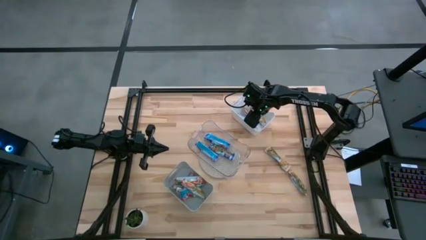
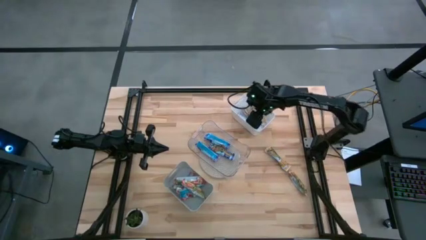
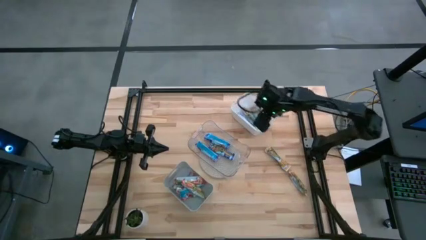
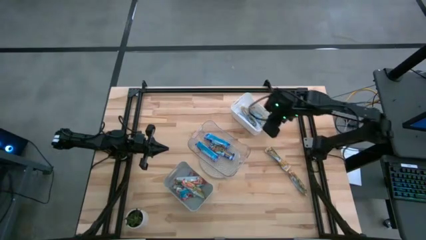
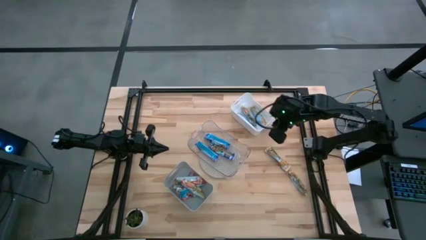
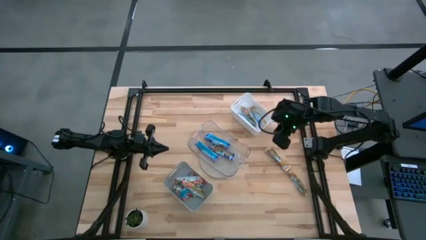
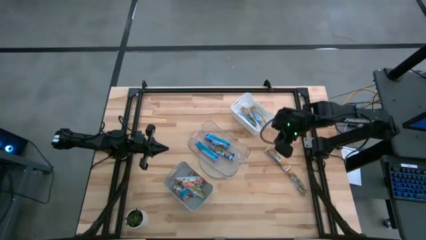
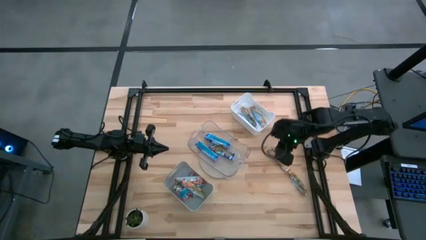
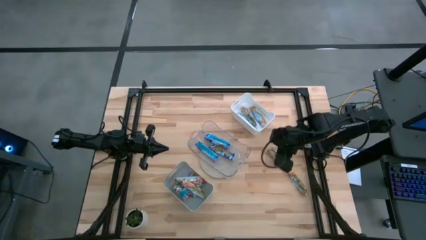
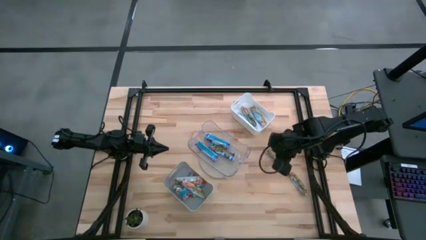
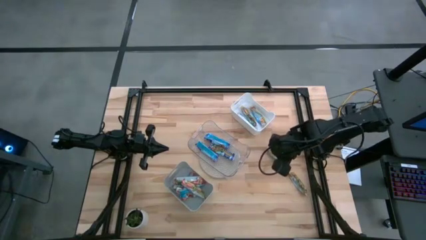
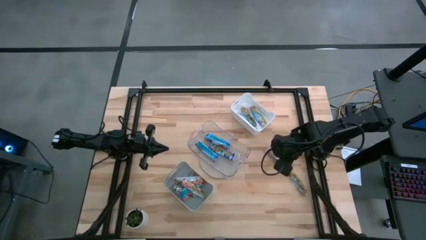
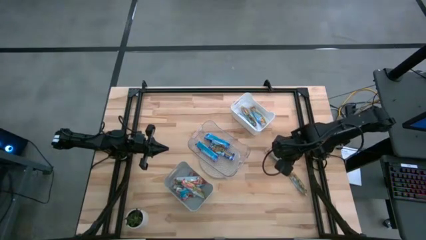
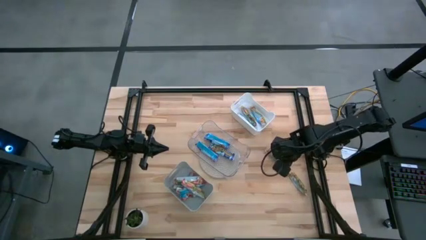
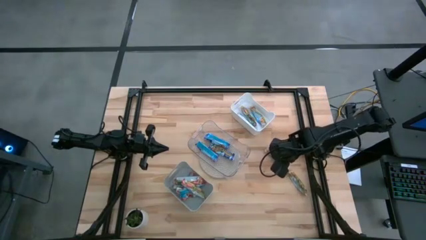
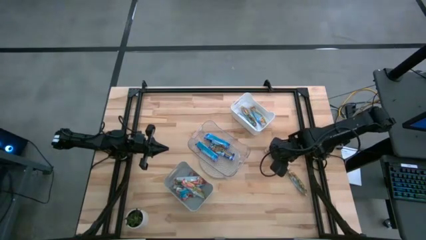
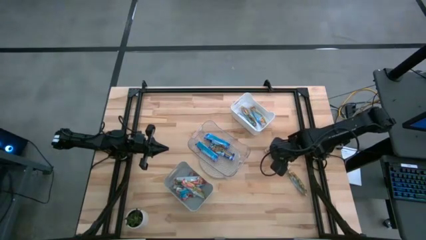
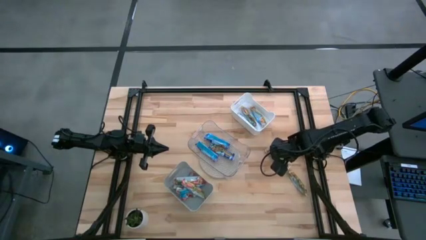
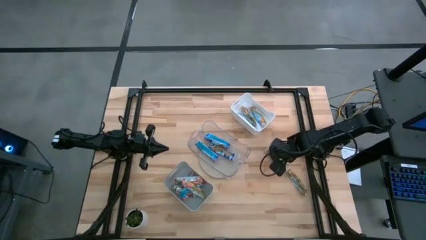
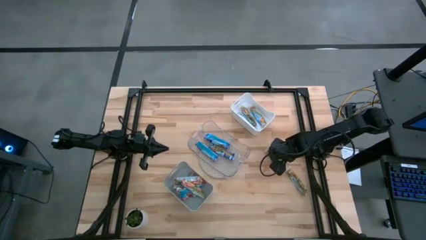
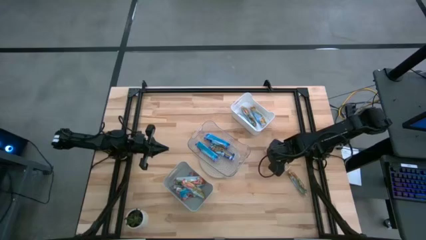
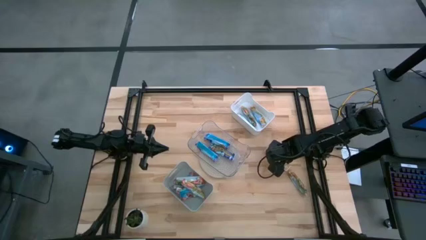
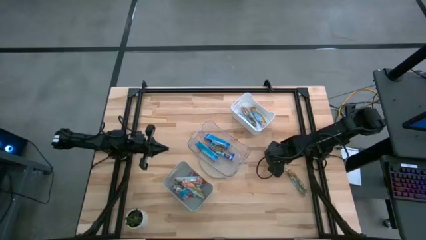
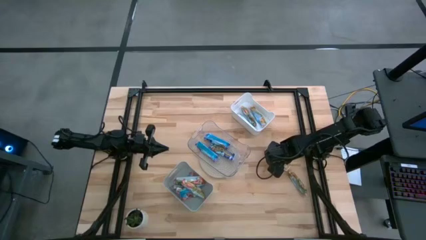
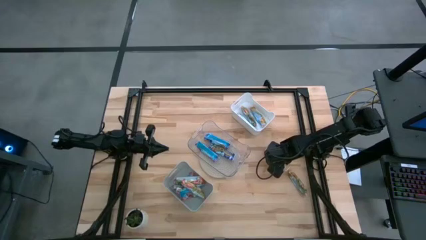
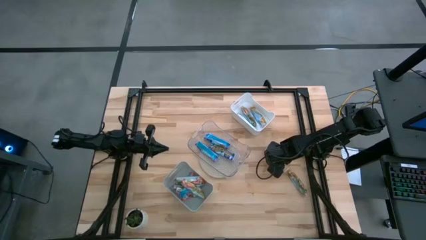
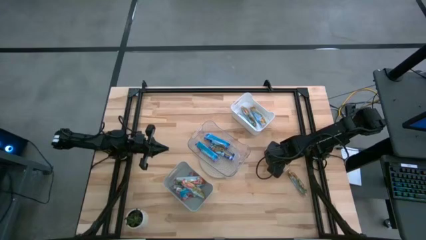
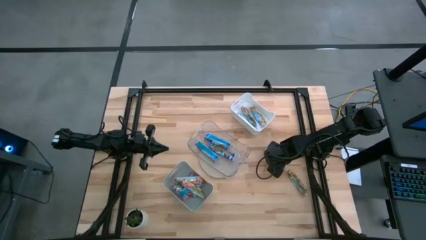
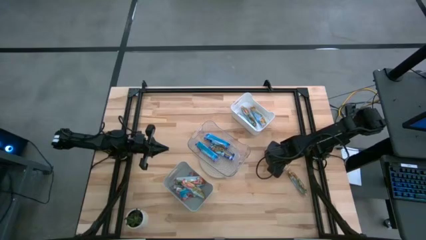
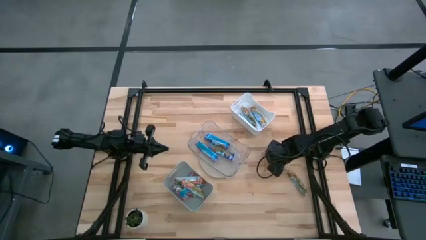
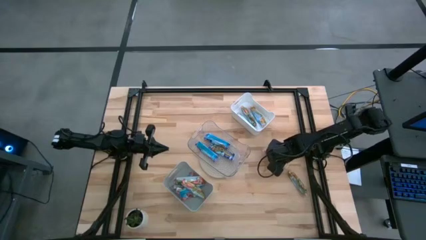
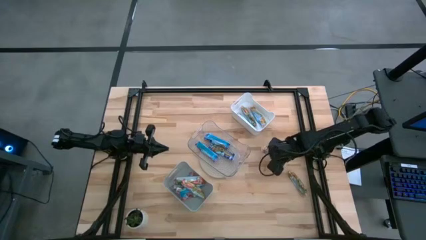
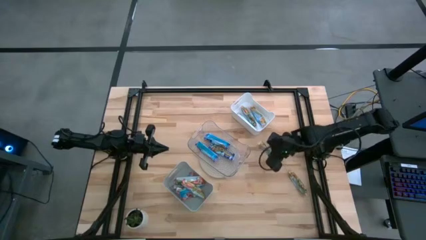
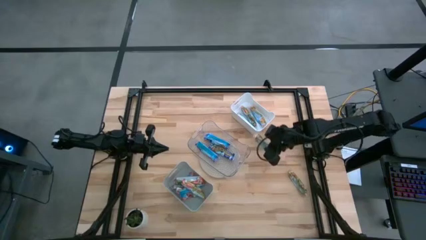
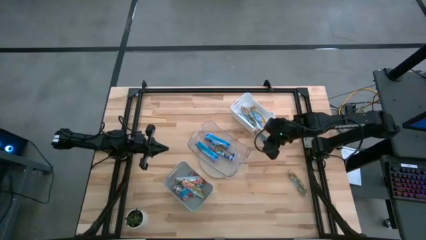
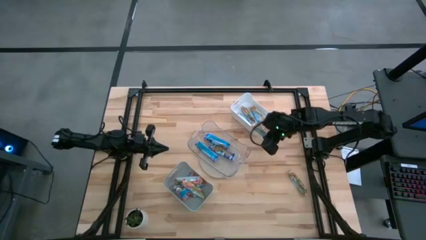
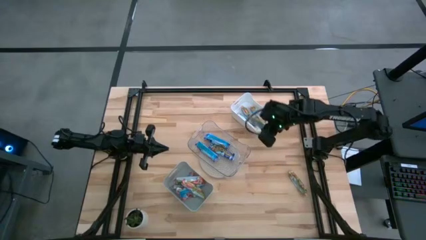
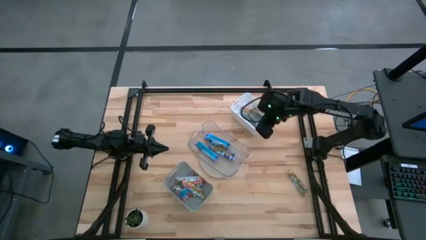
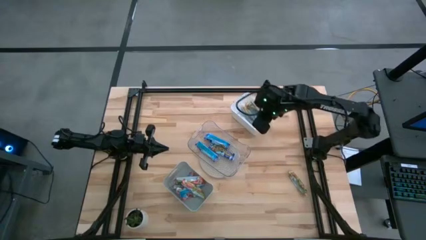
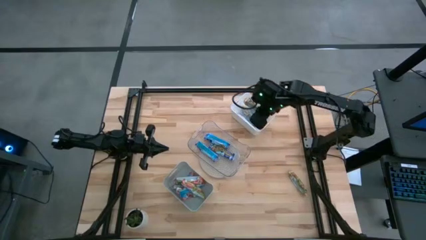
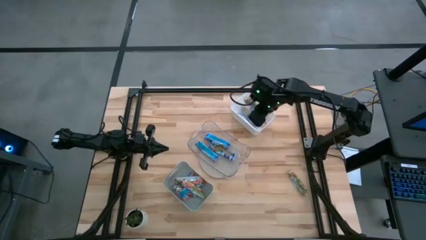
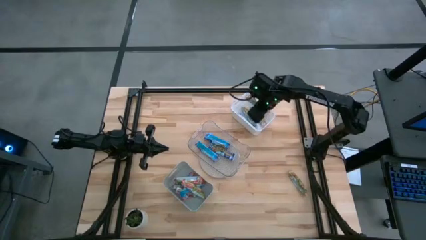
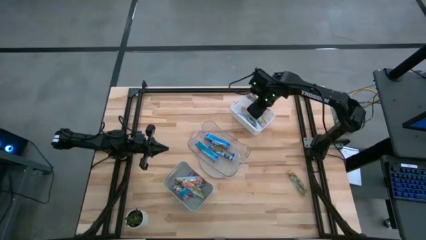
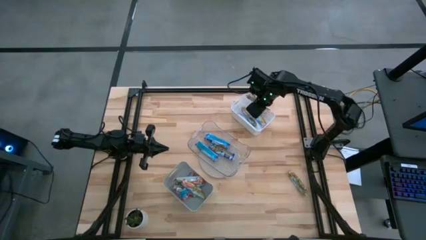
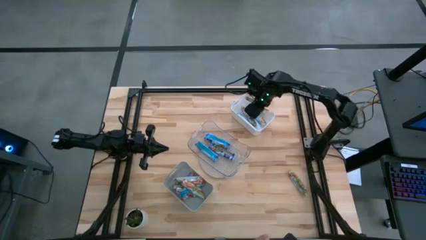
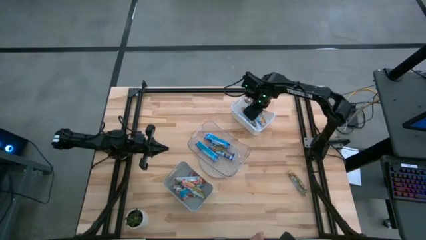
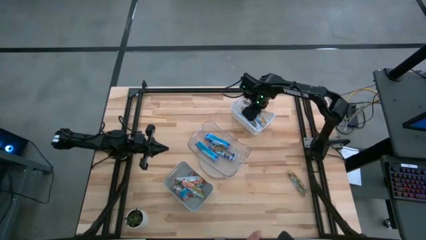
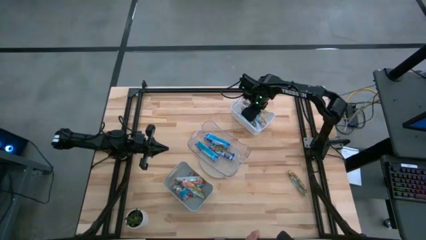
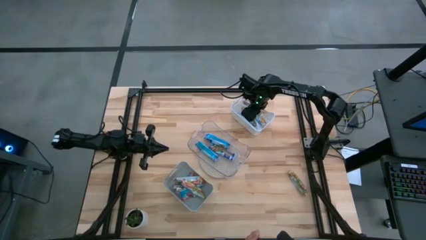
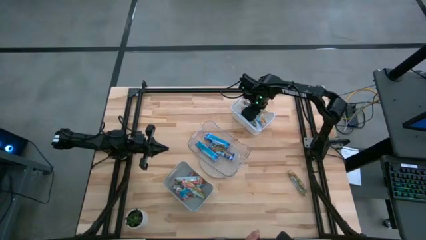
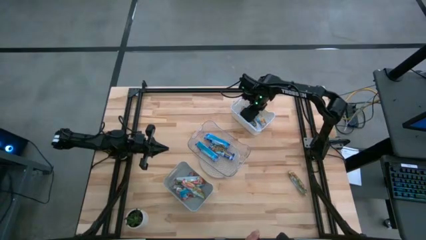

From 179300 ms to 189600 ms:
Task: Pick and place Granola Bars by type
Put the yellow granola bar into the white bin

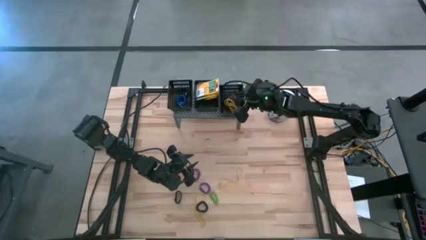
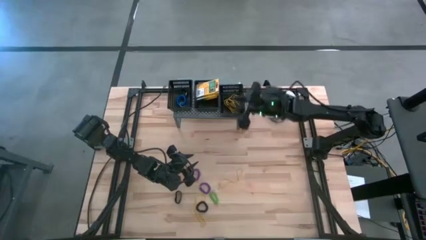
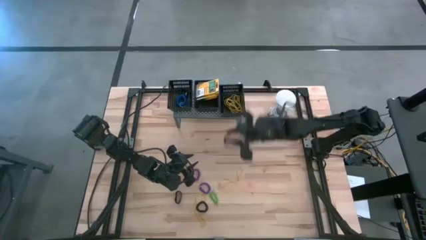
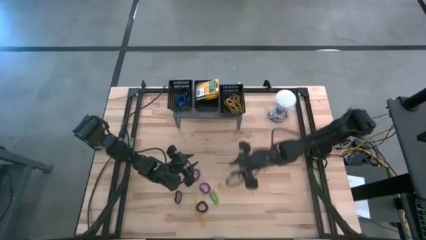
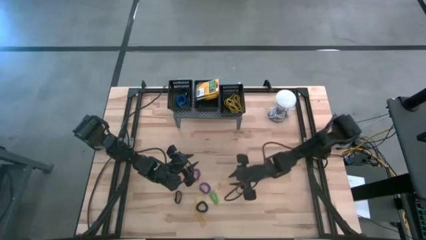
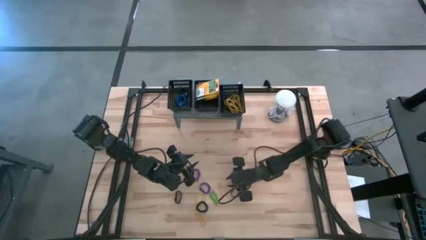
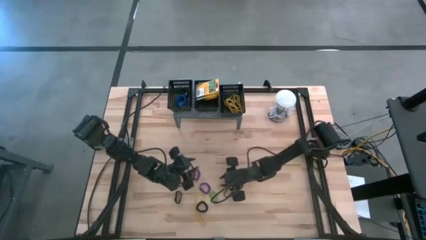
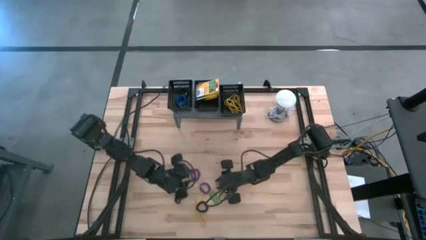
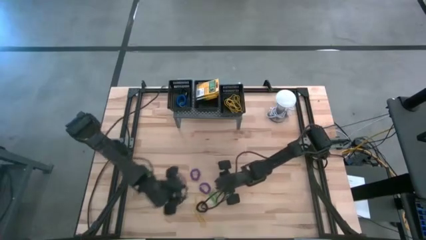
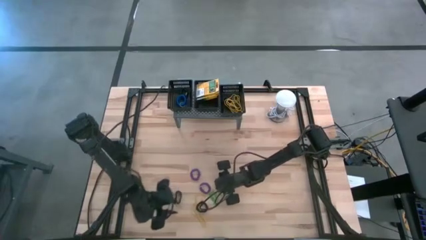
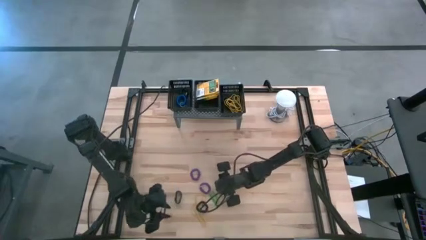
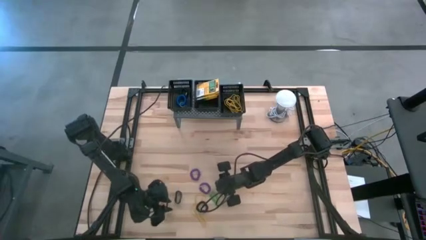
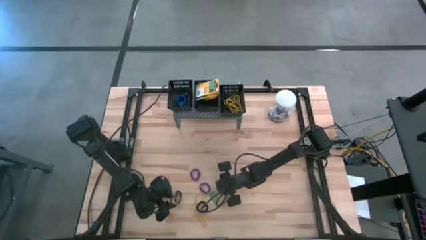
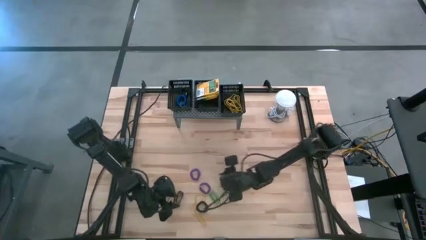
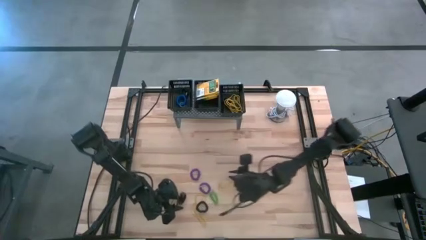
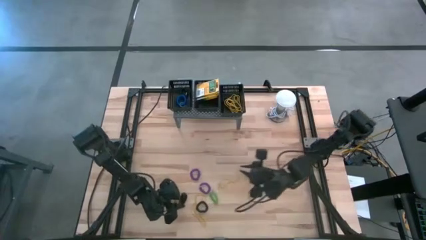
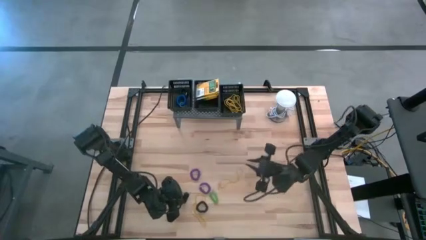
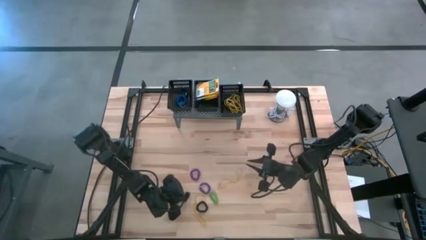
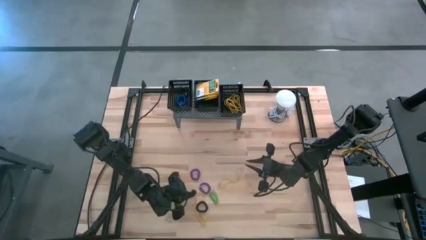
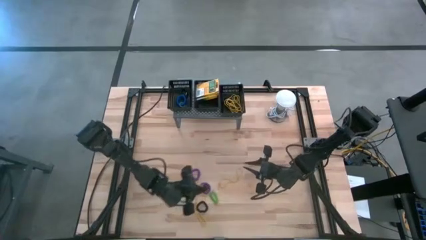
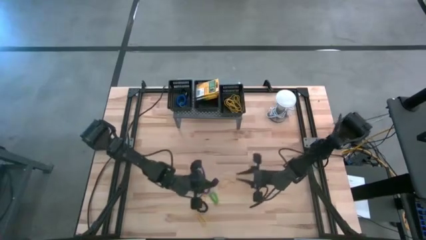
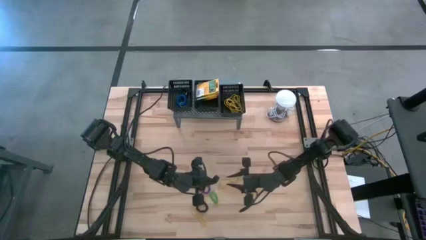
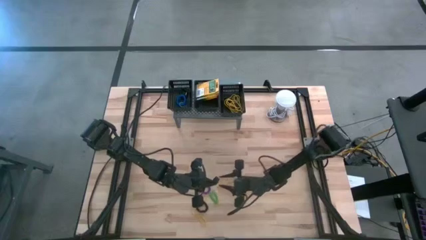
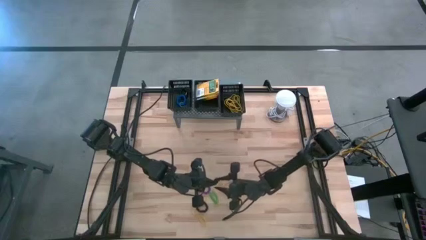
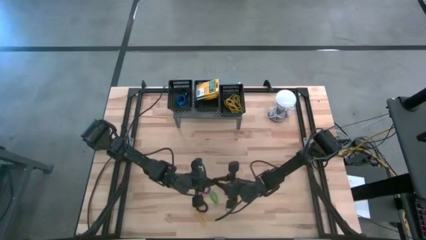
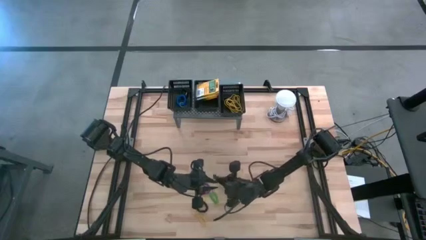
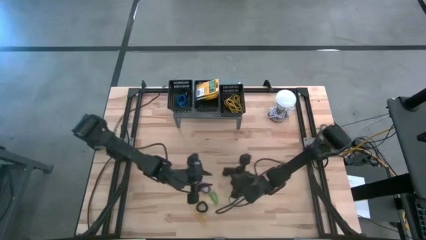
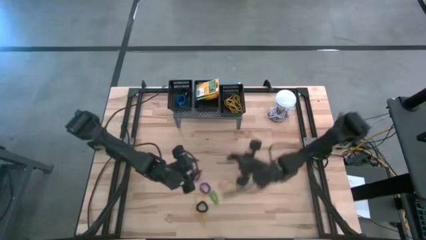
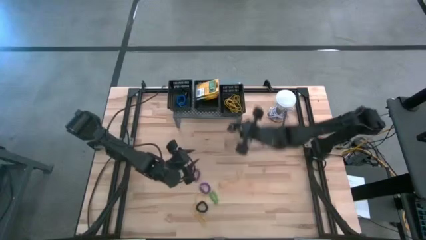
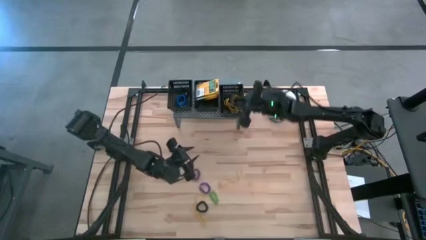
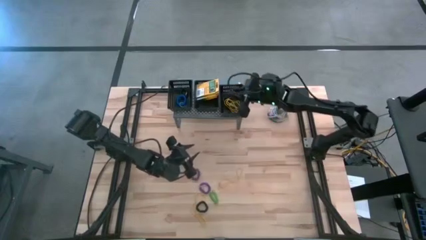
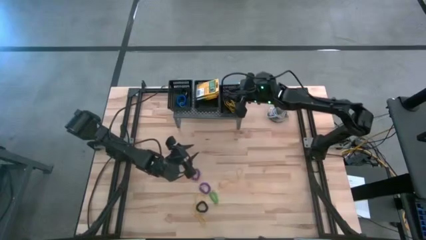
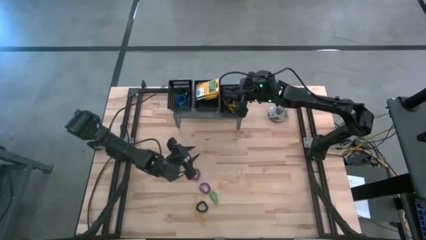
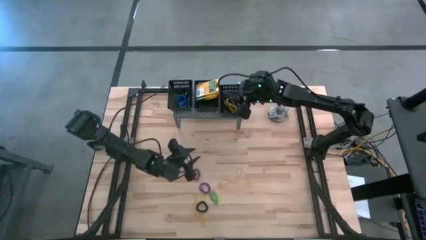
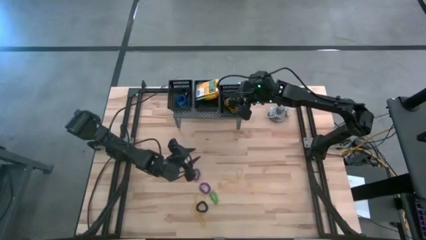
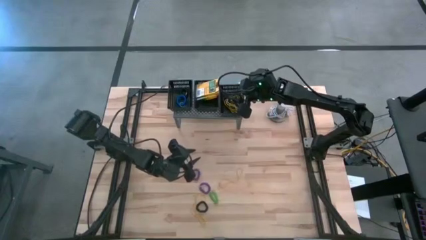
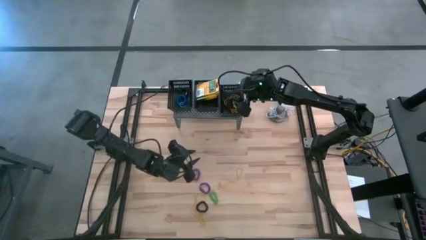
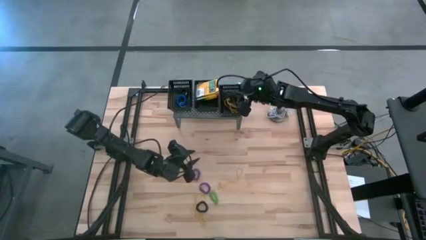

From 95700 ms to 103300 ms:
Task: Pick & Place Office Desk Supplies
Put the black rubber band into the right black bin on the shelf
